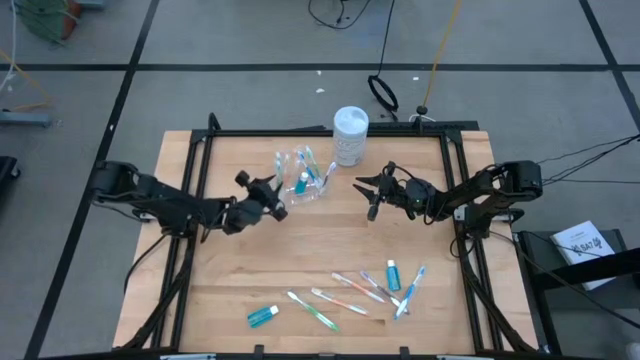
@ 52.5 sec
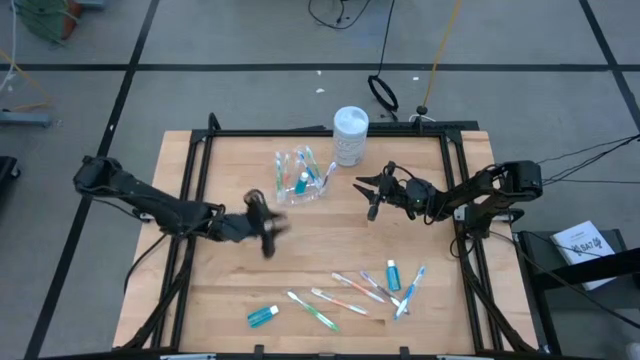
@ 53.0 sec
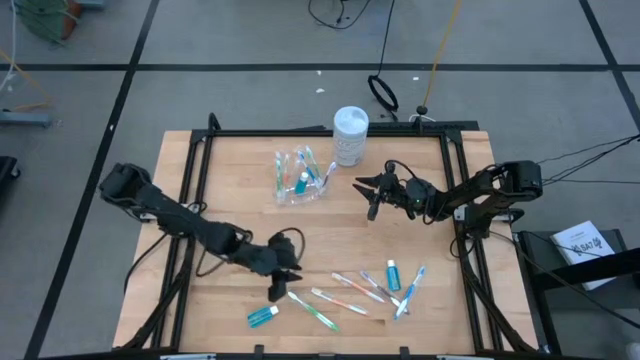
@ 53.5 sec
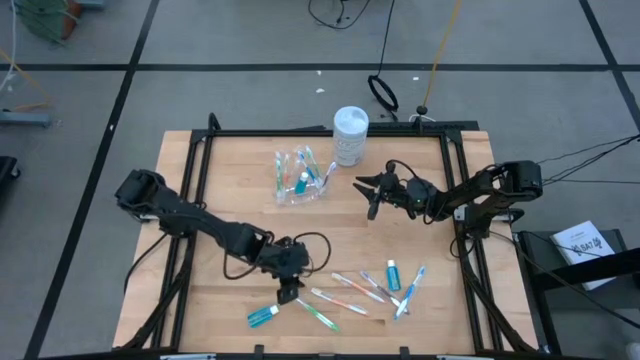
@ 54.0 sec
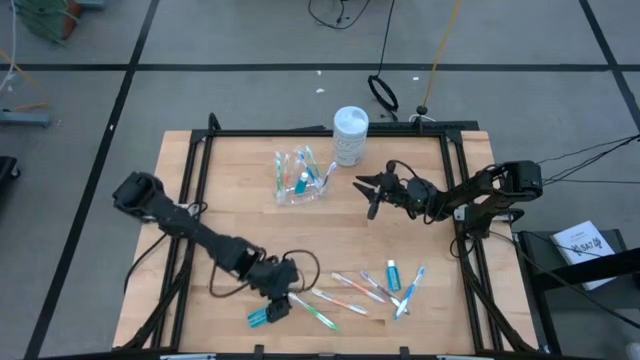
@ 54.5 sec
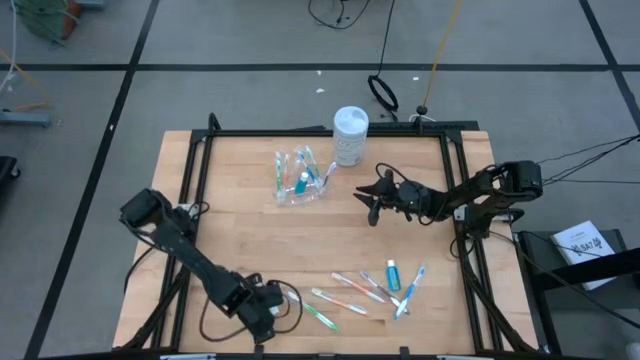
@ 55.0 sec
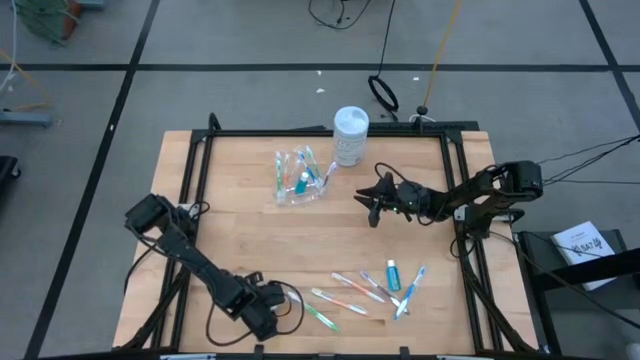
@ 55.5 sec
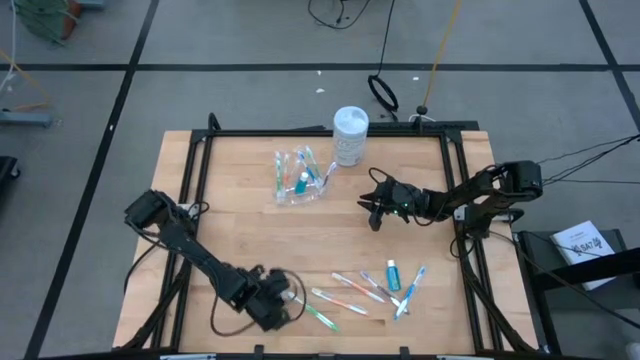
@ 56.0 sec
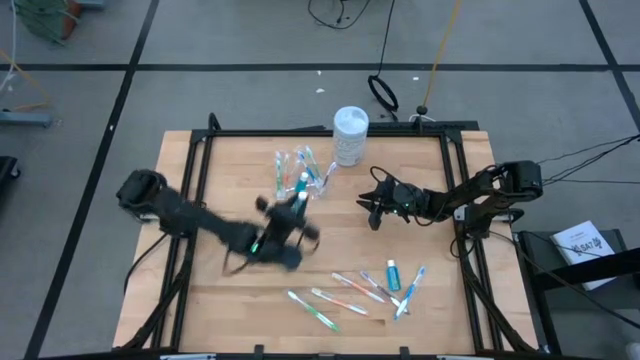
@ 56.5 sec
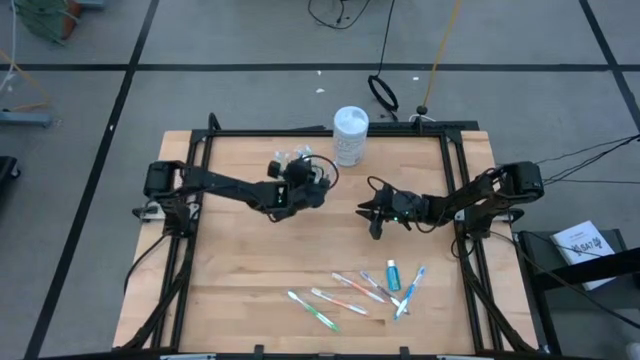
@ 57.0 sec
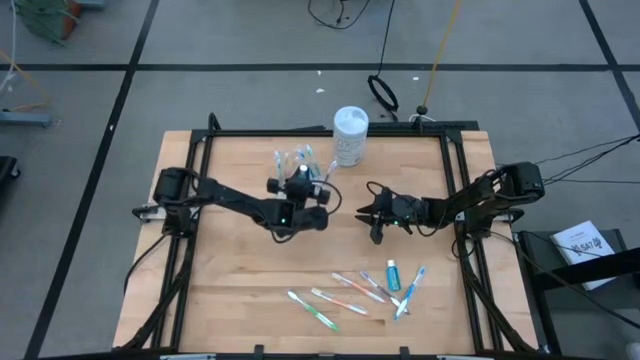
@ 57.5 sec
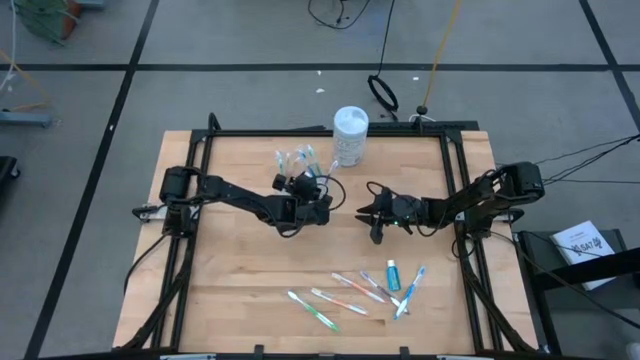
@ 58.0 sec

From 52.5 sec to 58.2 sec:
Task: Pick & Place toothbrushing station
Put the blue mouthwash bottle into the transparent organizer

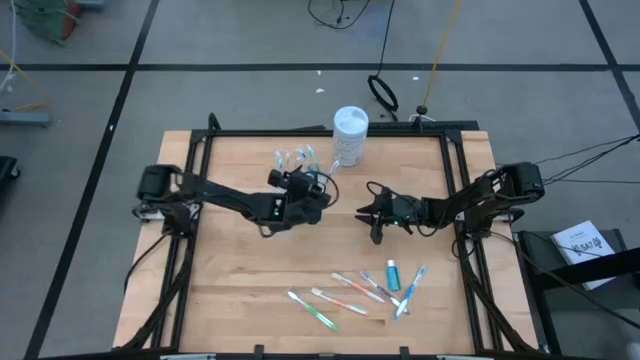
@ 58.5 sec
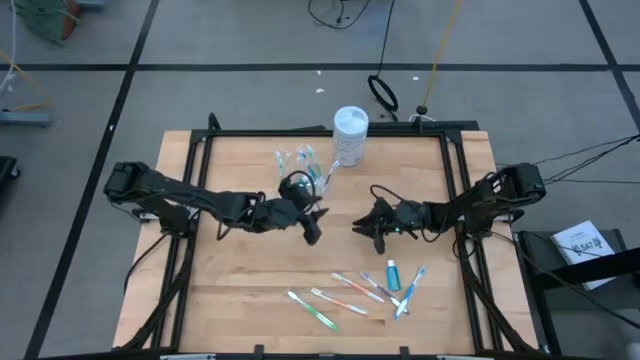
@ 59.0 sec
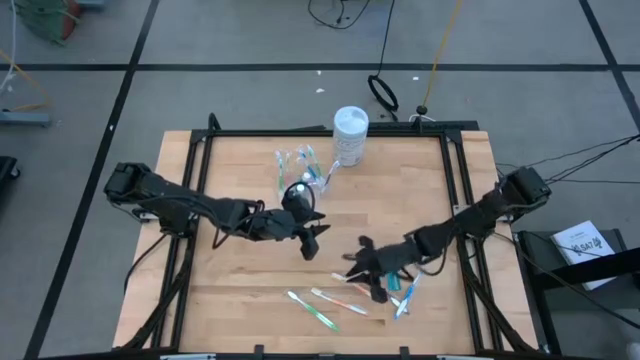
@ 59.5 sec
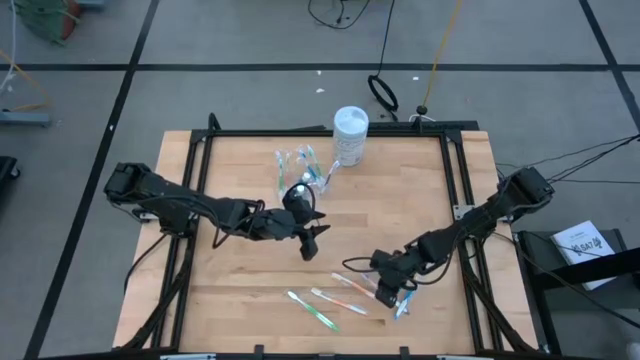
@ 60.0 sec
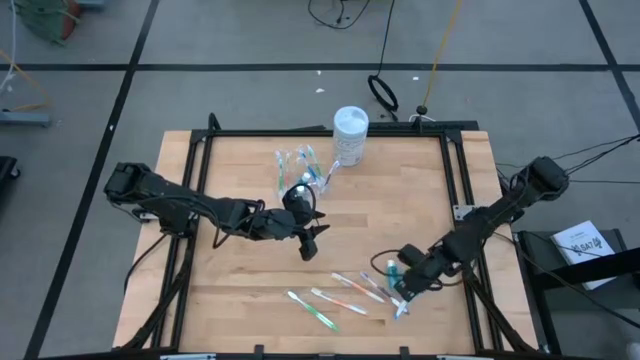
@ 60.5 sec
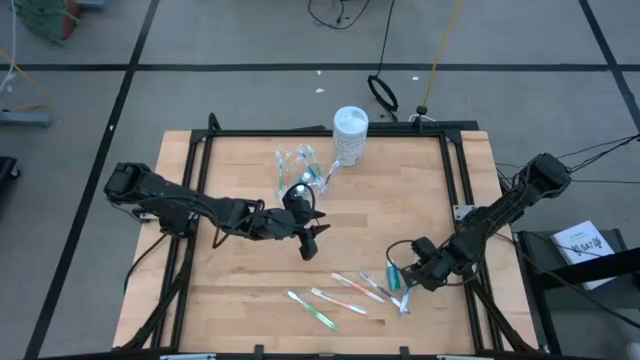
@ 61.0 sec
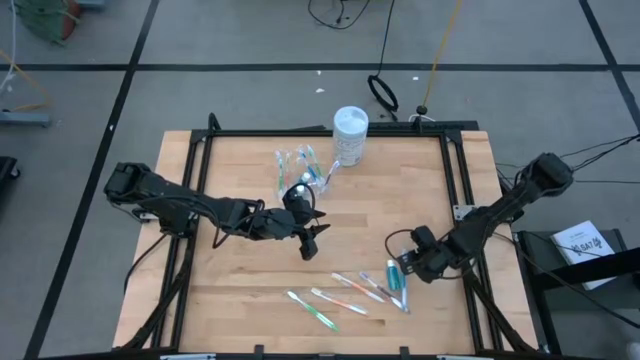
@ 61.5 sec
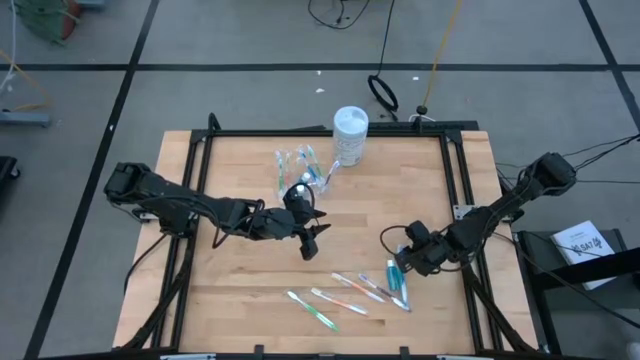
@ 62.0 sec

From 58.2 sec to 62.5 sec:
Put the blue toothbrush into the transparent organizer

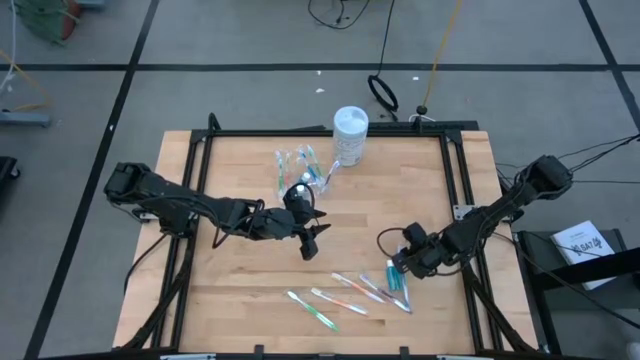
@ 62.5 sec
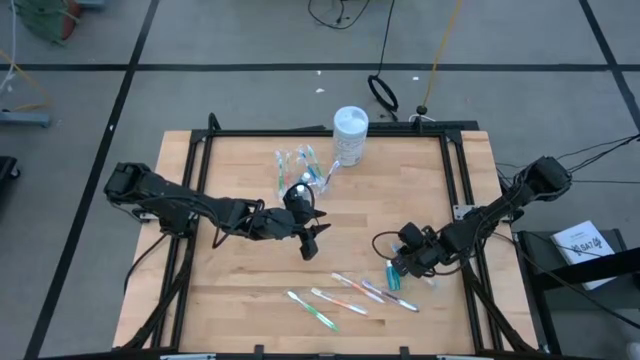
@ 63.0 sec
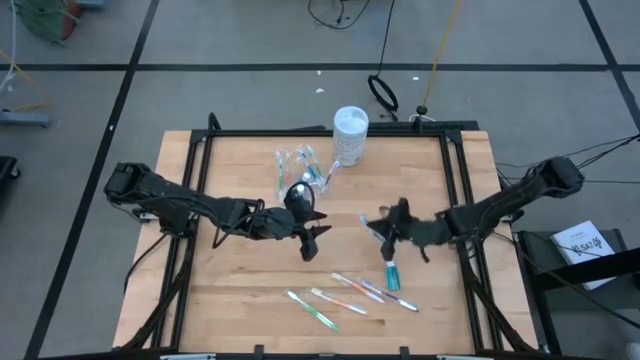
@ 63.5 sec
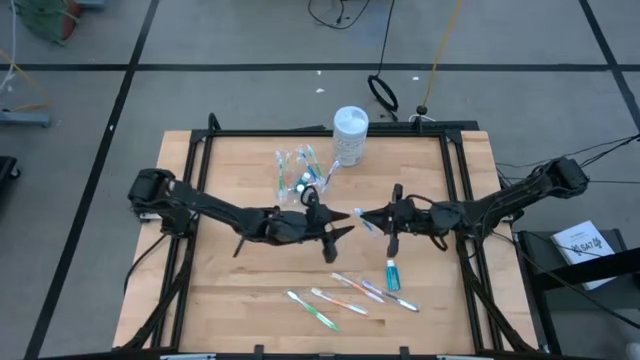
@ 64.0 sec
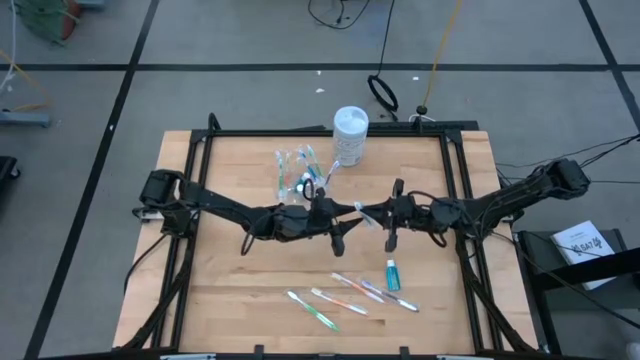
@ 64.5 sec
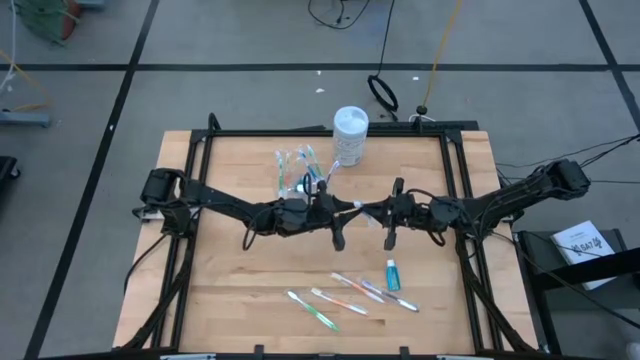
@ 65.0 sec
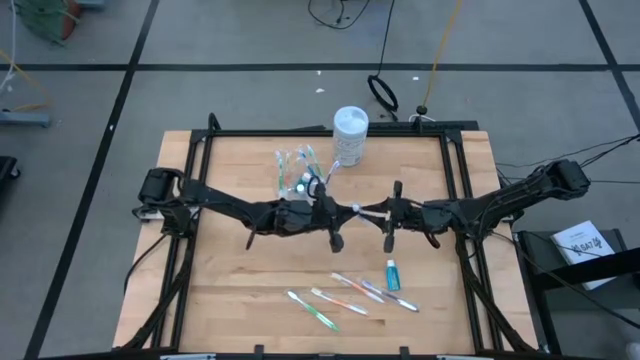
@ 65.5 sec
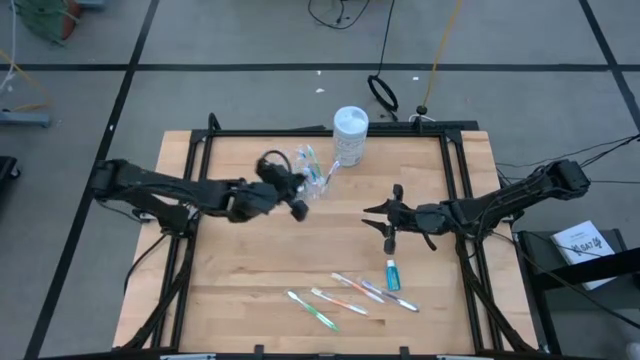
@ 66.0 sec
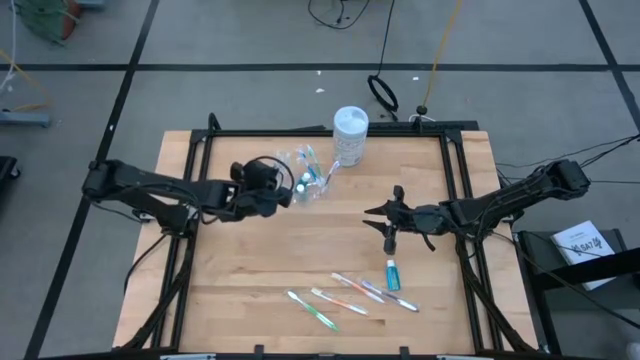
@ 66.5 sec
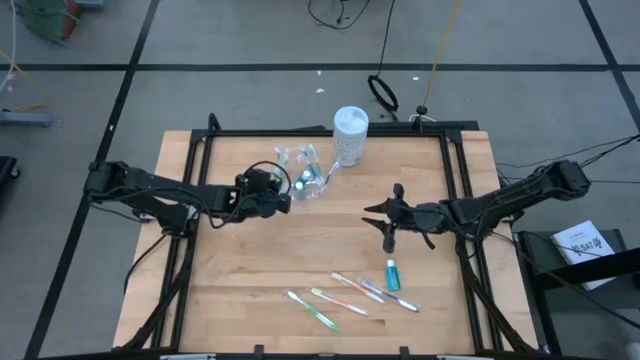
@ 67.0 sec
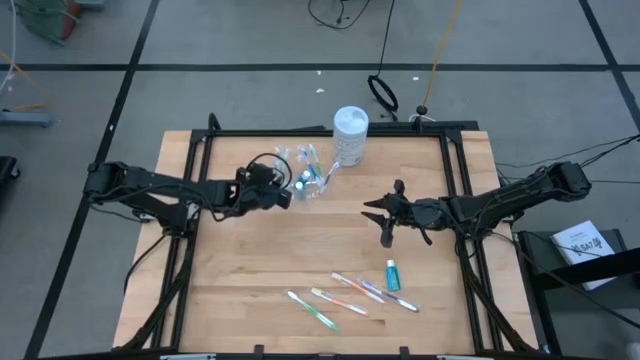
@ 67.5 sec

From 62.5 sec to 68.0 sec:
Put the blue toothbrush into the transparent organizer

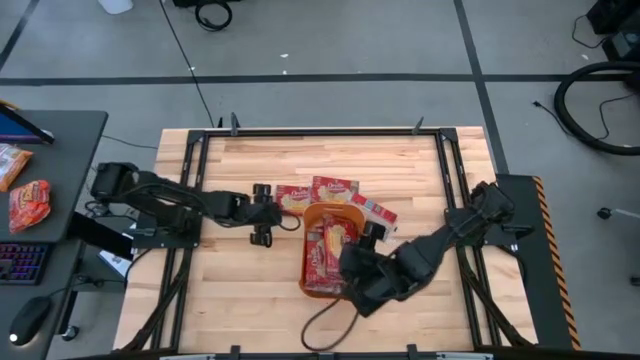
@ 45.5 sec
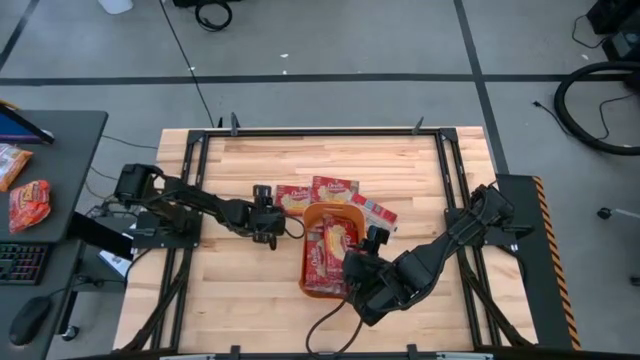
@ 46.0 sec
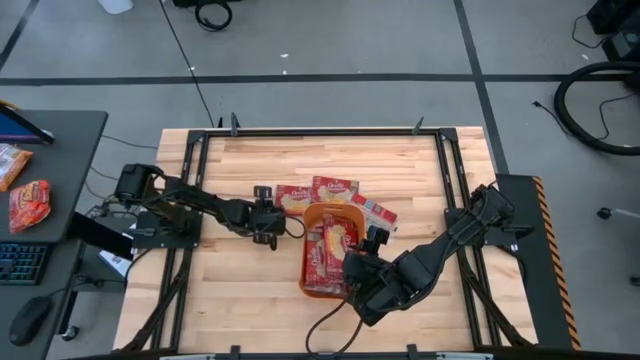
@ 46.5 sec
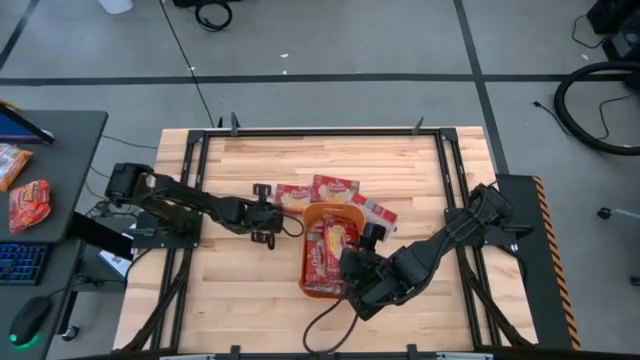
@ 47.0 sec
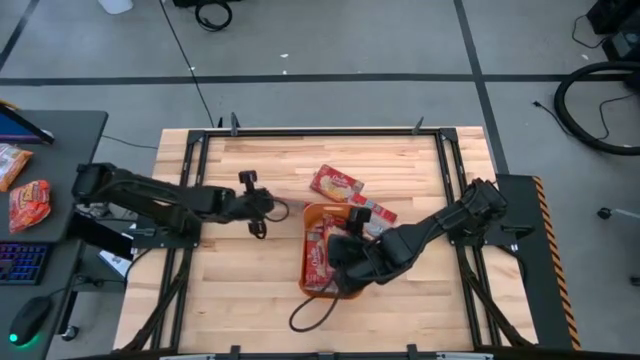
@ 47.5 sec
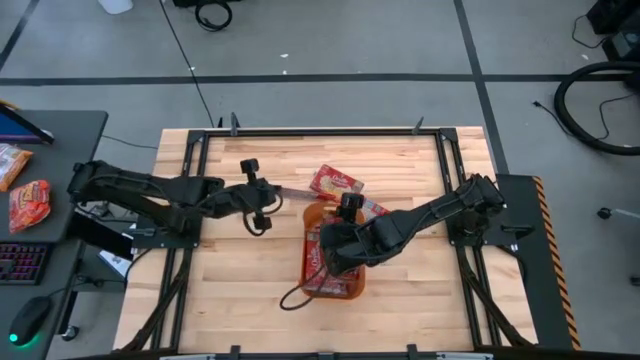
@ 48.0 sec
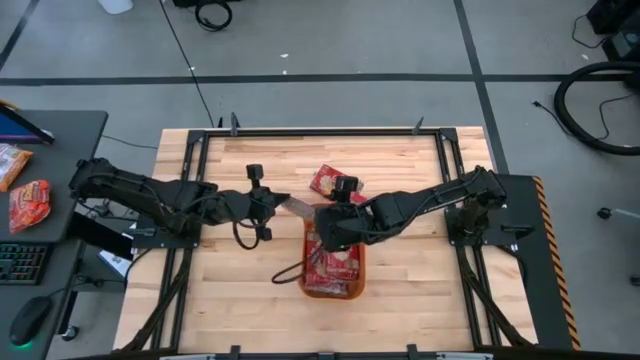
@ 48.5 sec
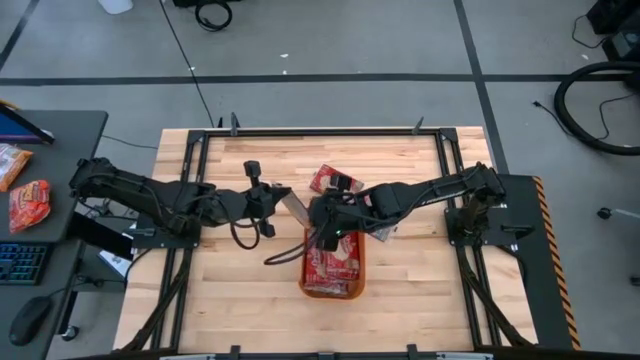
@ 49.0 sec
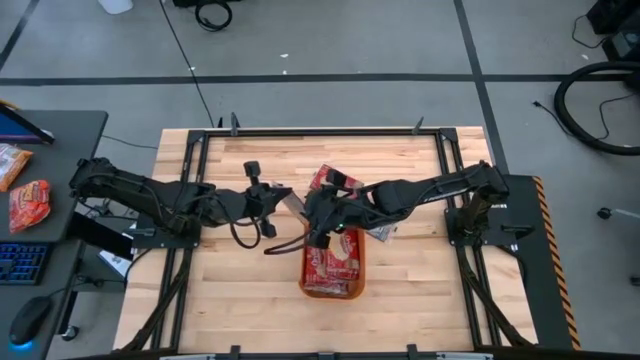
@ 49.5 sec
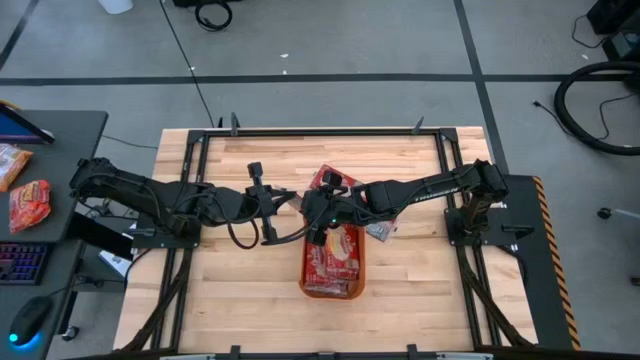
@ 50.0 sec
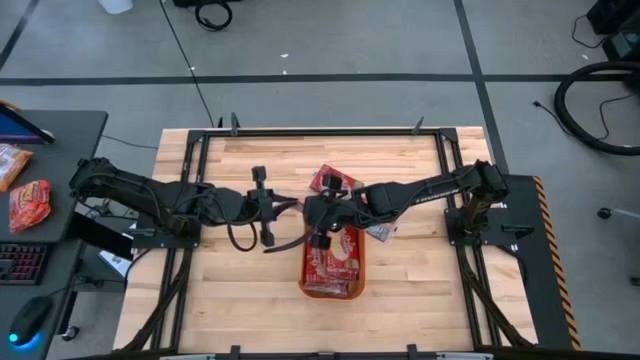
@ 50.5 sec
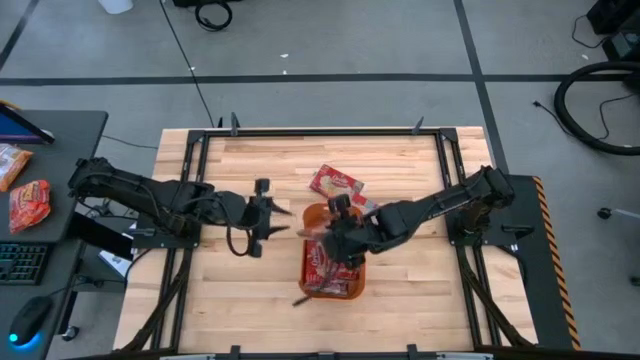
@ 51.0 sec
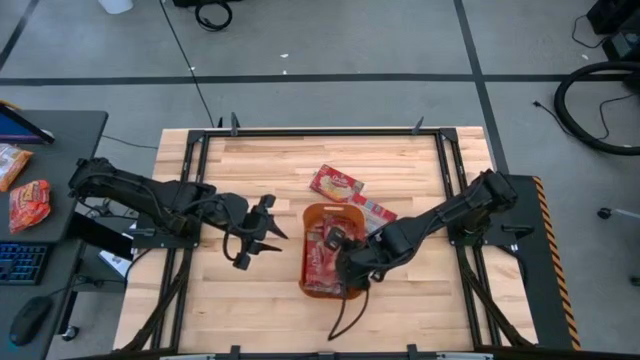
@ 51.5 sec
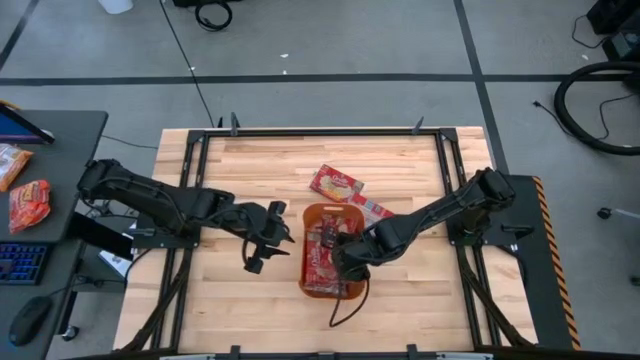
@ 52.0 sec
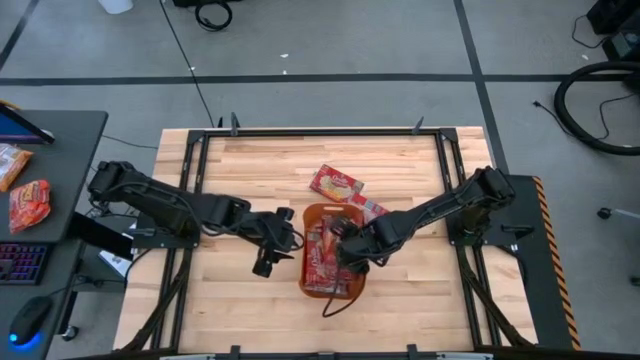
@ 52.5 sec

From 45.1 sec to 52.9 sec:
Task: Sort popcorn bags into baskets
Put the red popcorn bag into the orange bin
